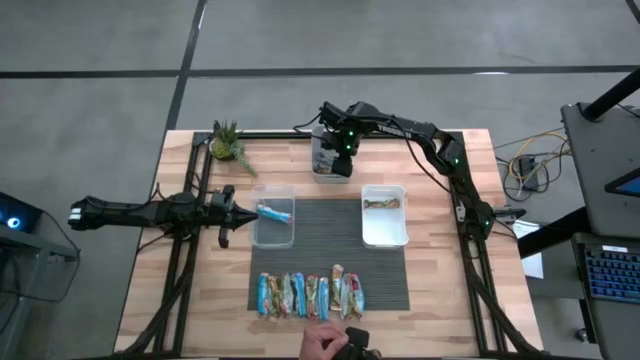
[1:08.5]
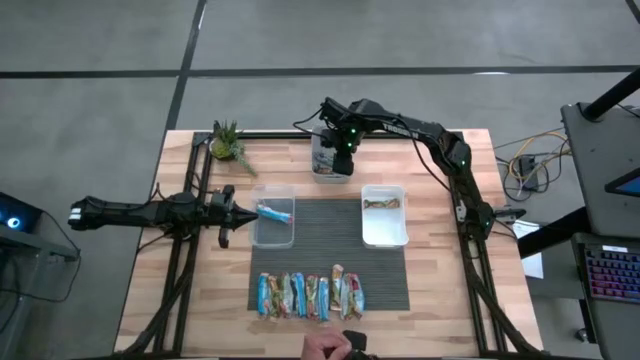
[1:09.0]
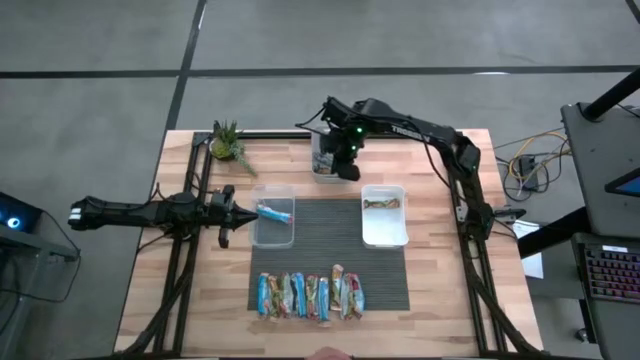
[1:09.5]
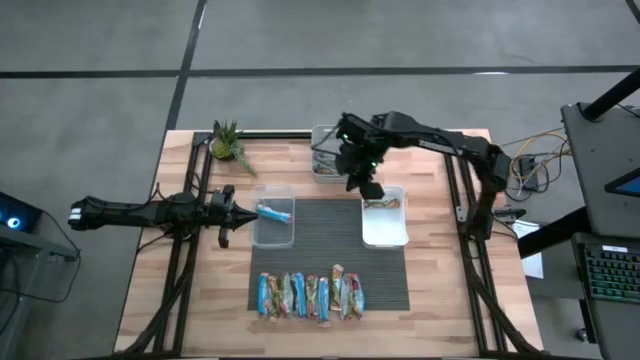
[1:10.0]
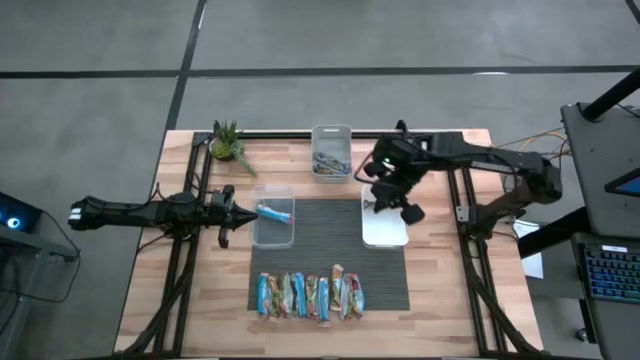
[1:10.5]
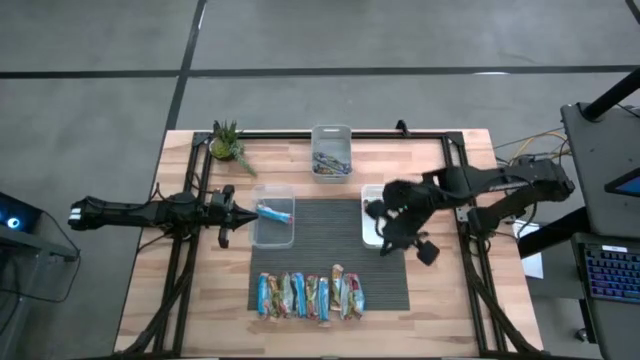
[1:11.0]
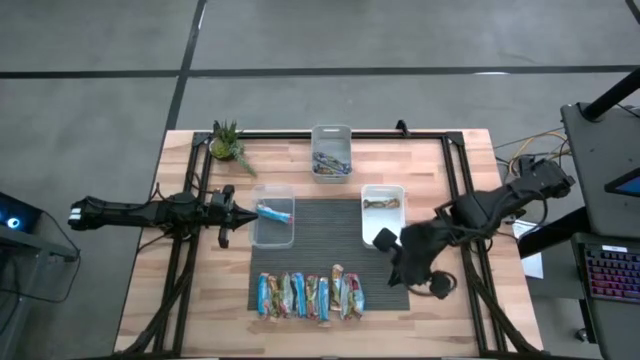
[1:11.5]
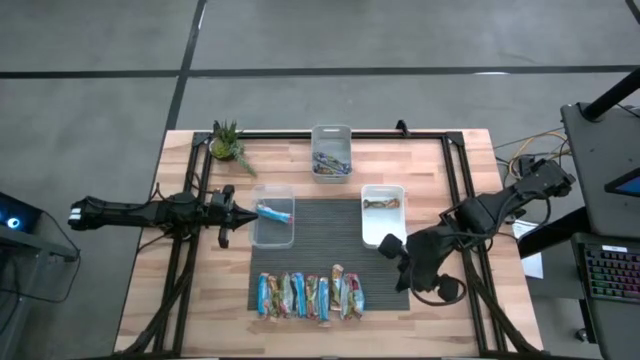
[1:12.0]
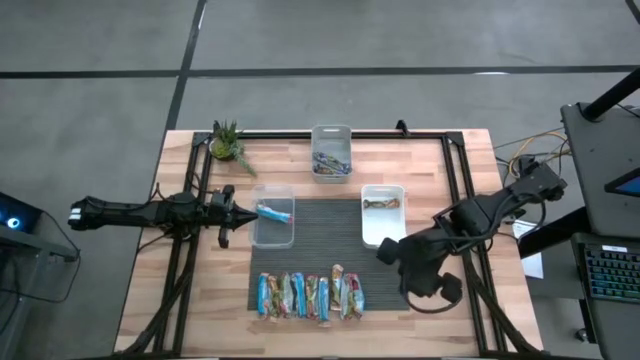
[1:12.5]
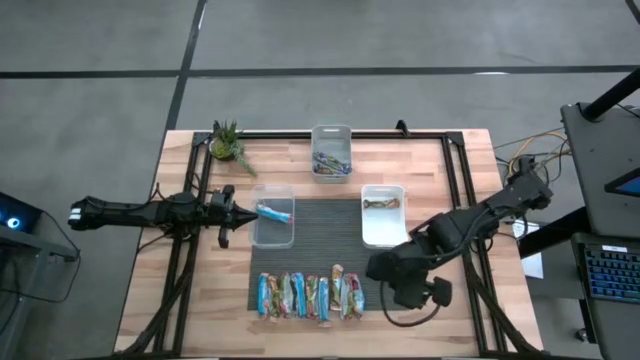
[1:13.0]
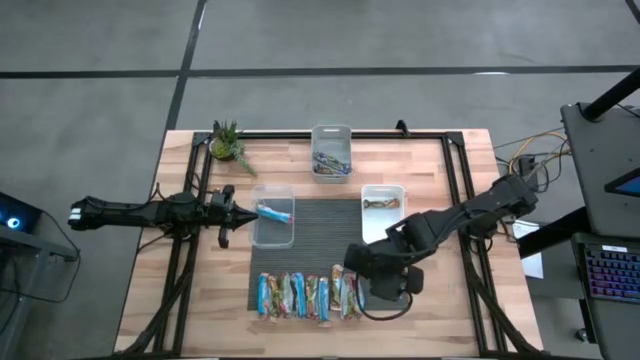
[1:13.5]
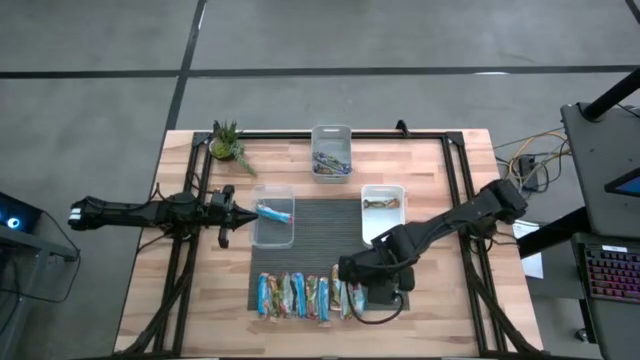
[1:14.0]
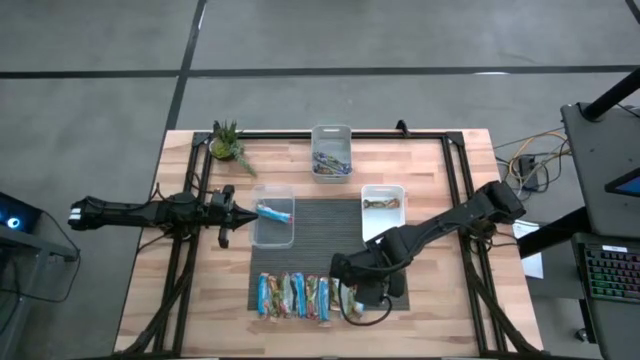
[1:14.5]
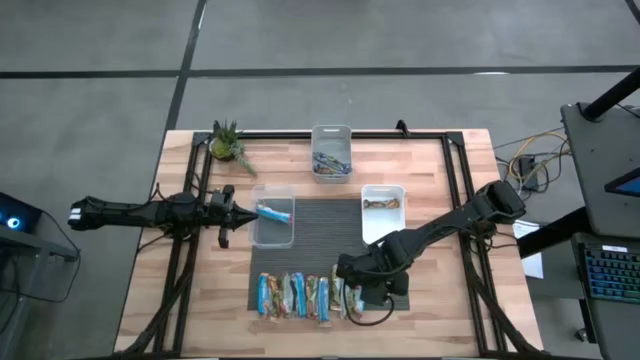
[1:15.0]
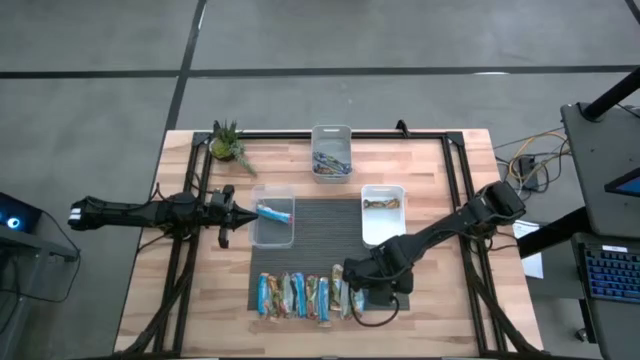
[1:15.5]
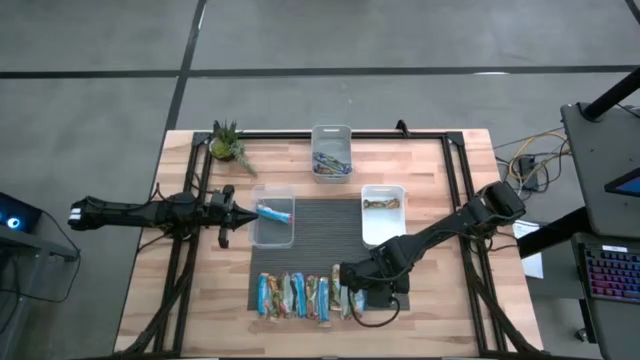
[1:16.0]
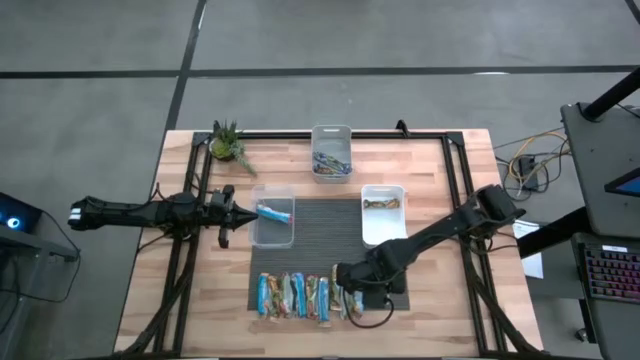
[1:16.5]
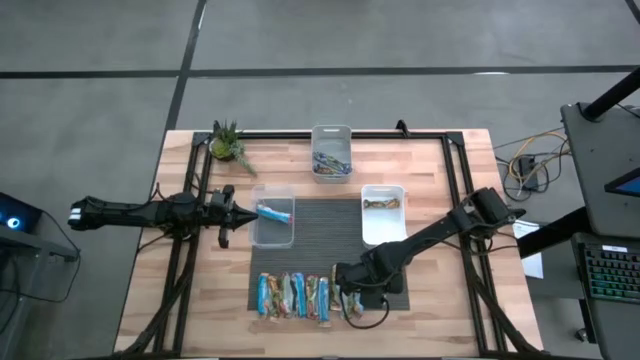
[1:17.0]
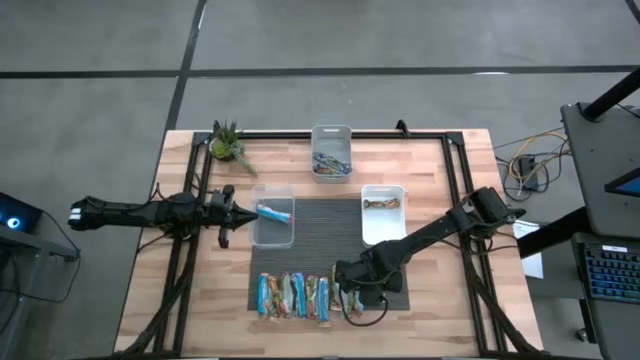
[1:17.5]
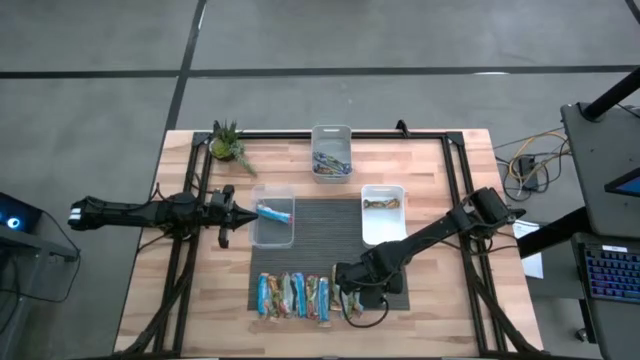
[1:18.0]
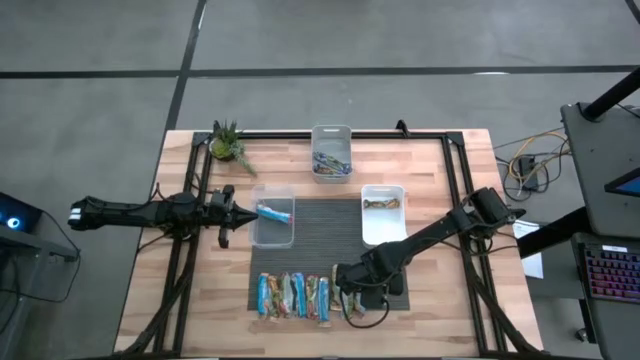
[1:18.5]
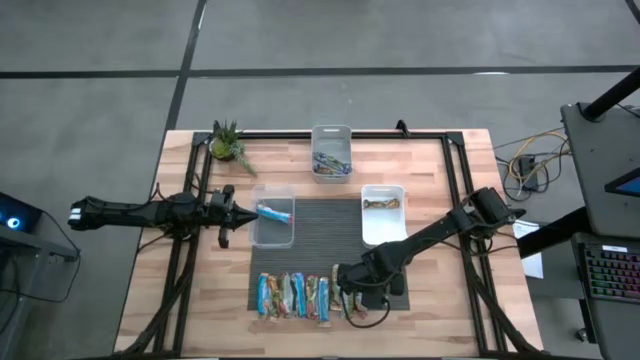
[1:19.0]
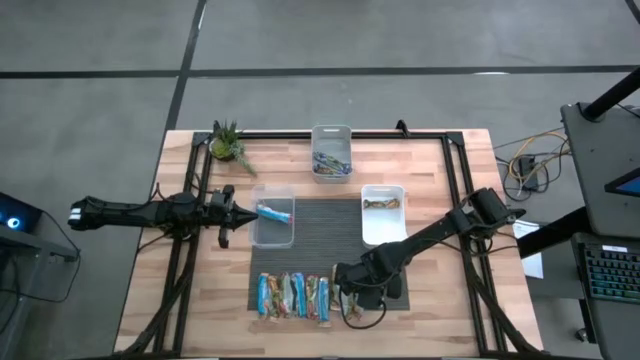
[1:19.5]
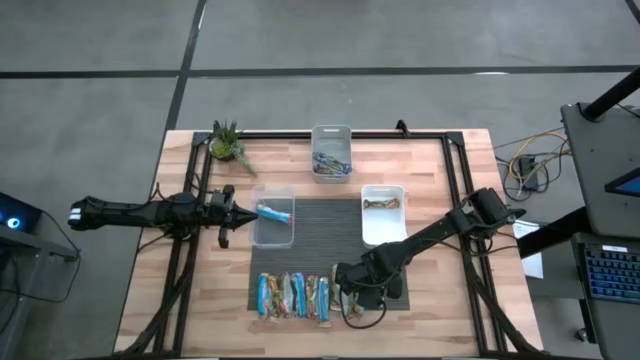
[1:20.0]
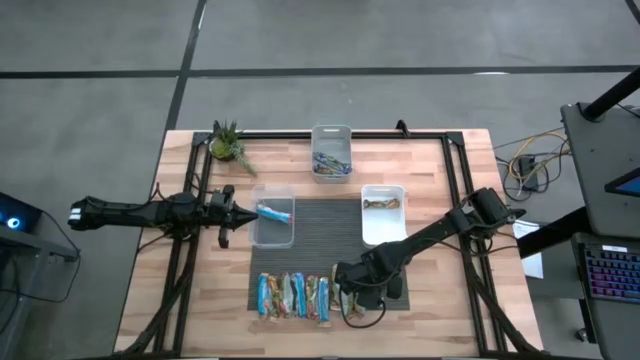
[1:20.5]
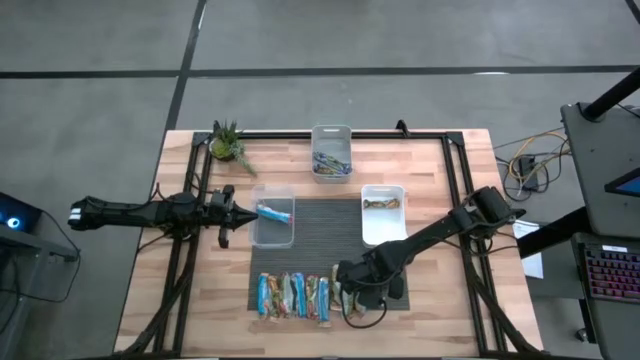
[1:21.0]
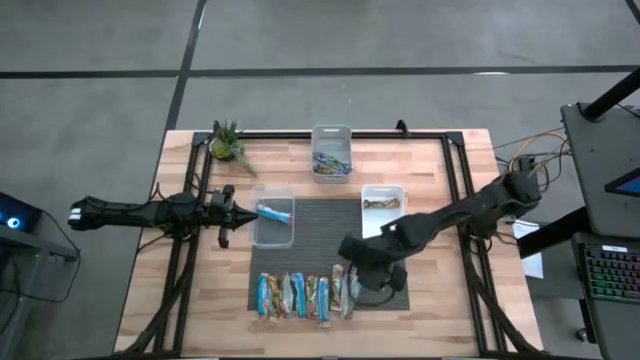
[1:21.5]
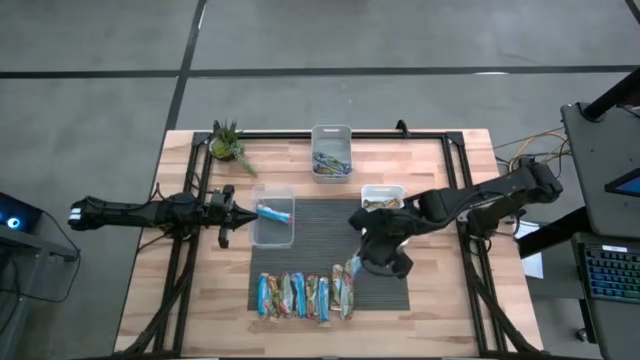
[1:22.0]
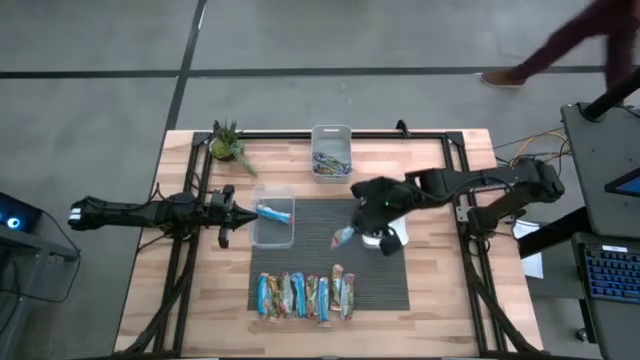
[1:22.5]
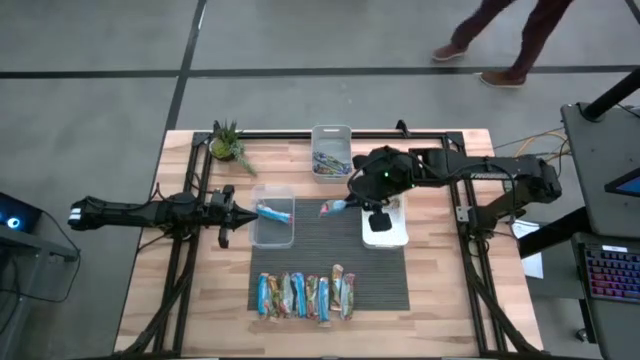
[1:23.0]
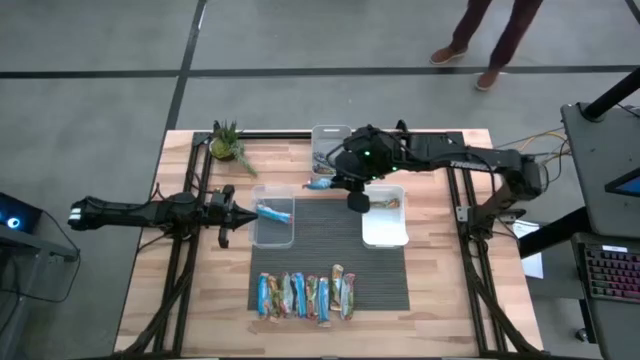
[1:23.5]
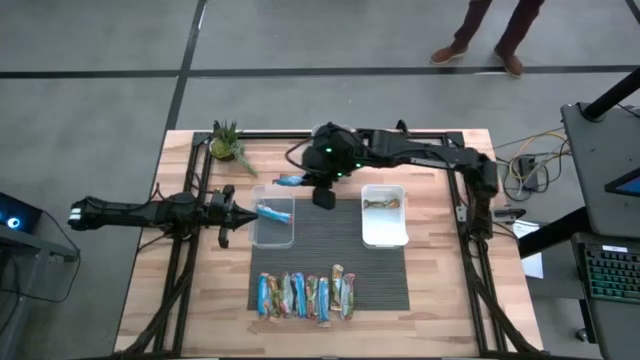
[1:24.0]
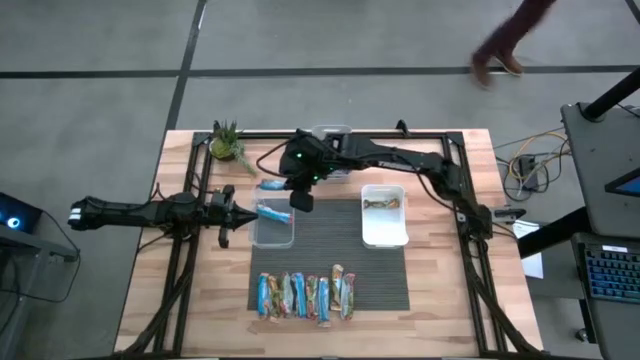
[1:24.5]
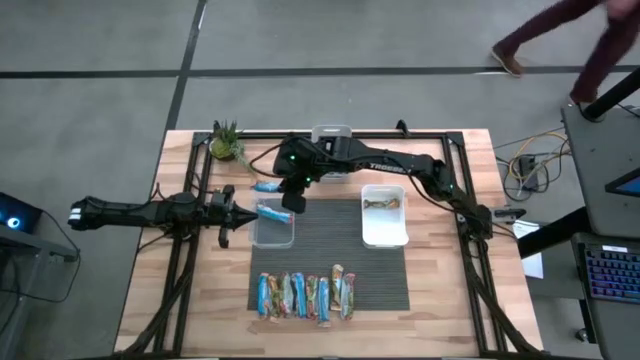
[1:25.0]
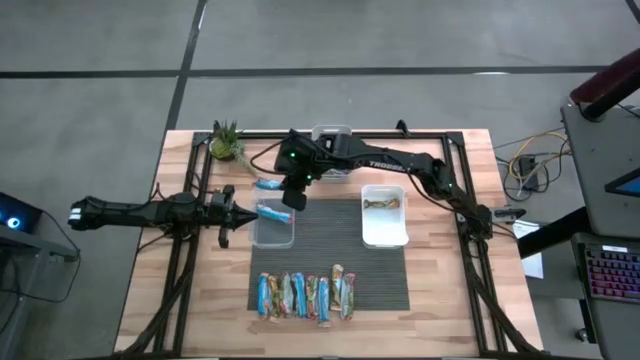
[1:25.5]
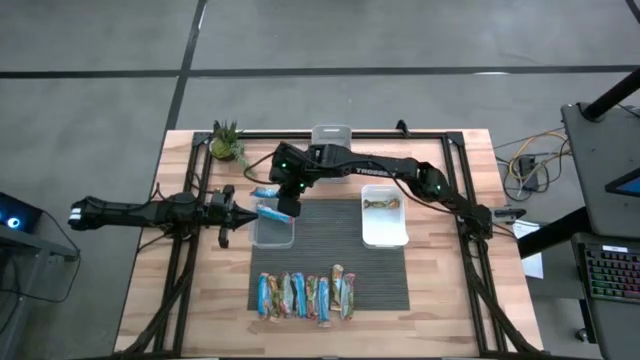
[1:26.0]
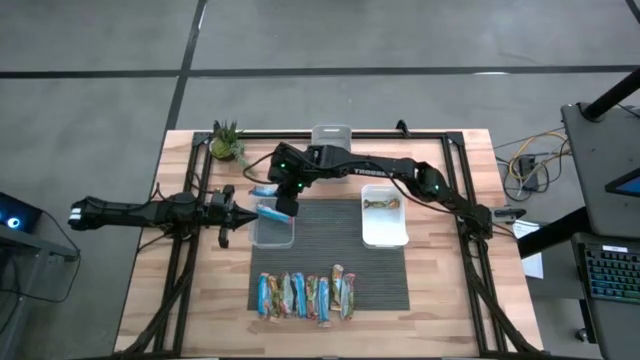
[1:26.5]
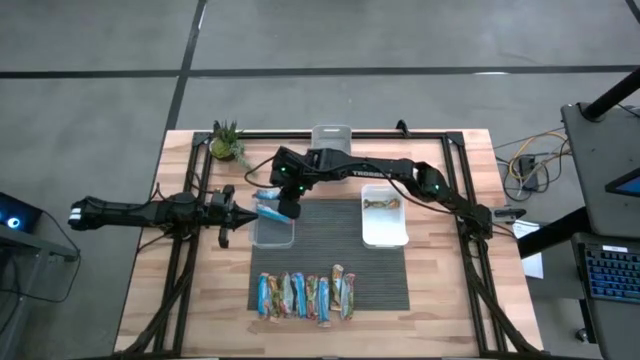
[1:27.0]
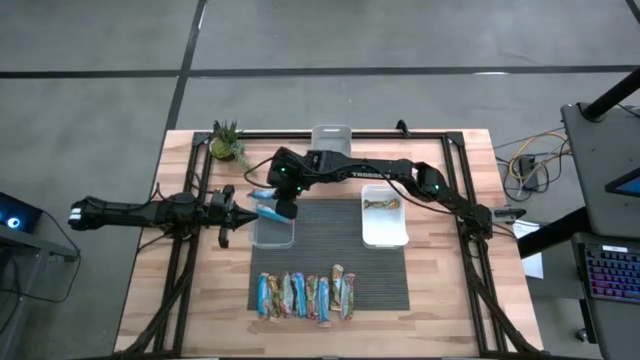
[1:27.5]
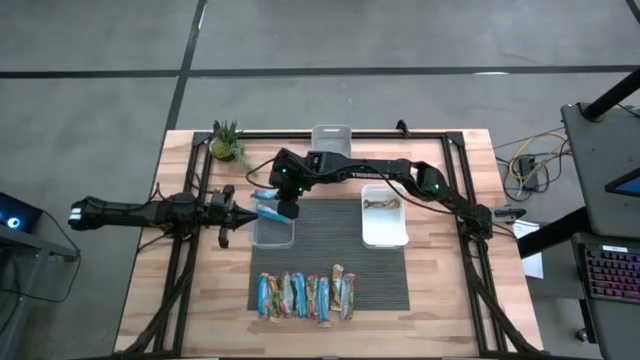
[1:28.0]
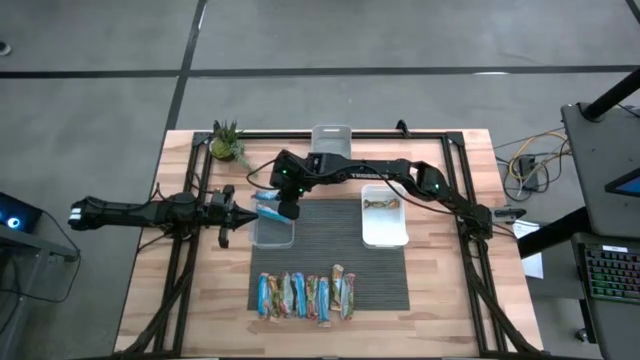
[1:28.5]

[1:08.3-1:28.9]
Task: Pick and place Granola Bars by type
Put the red granola bar into the transparent bin
